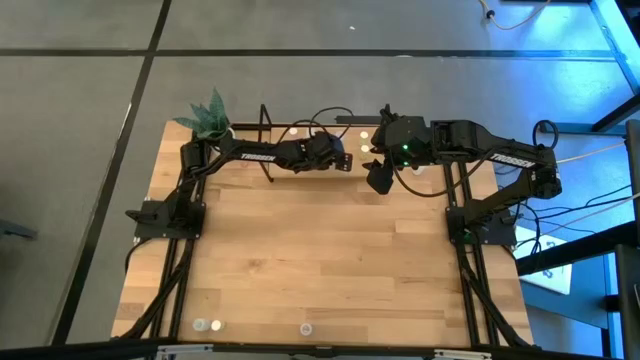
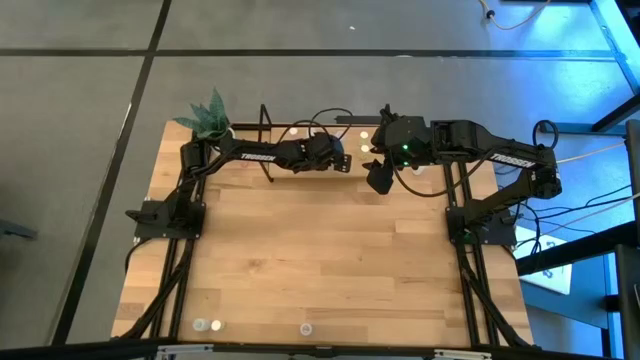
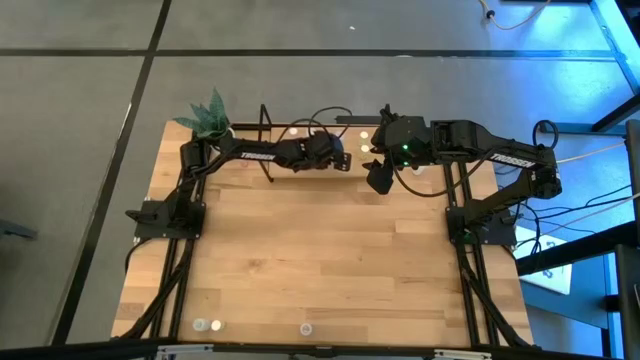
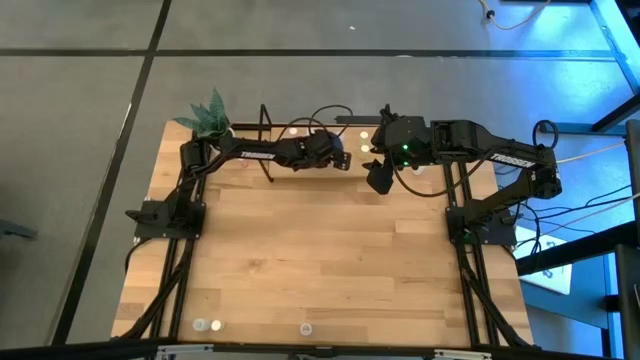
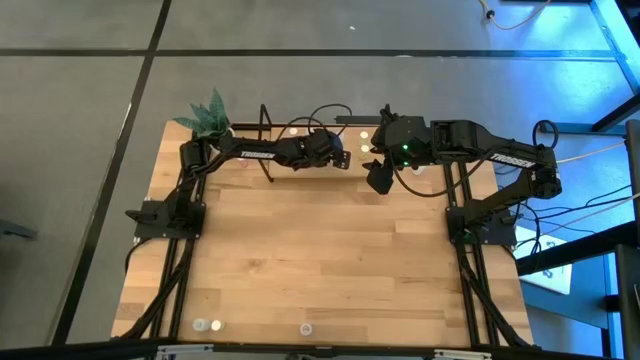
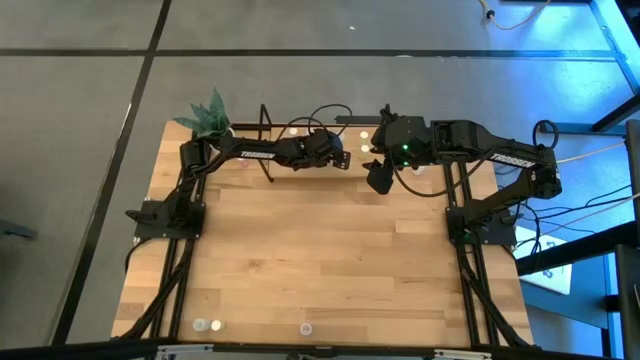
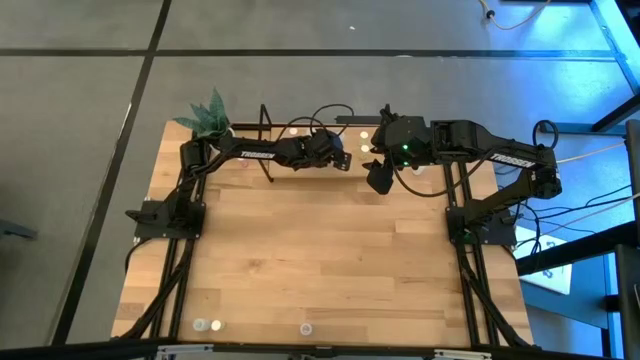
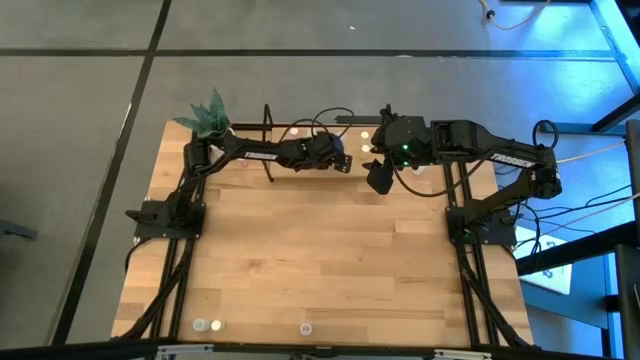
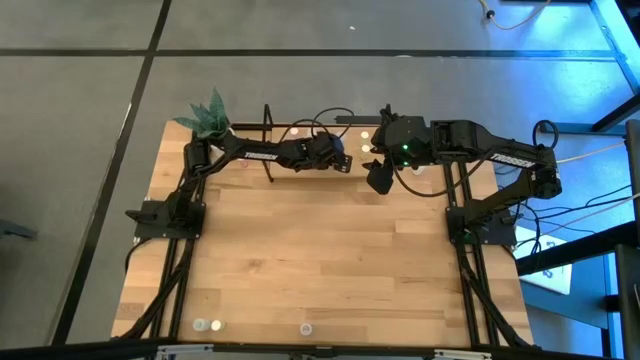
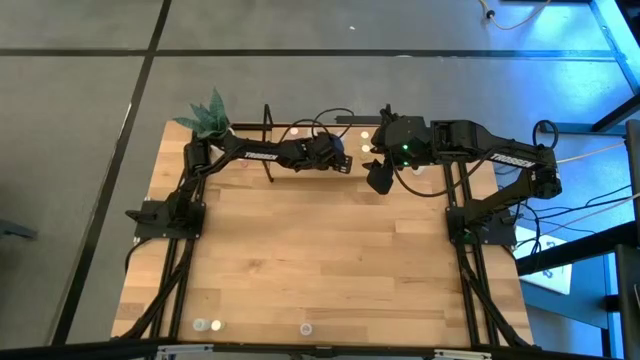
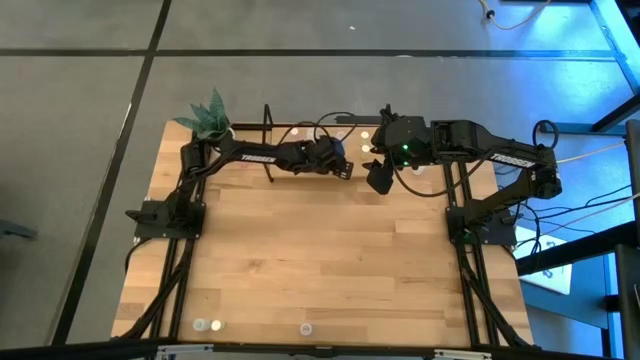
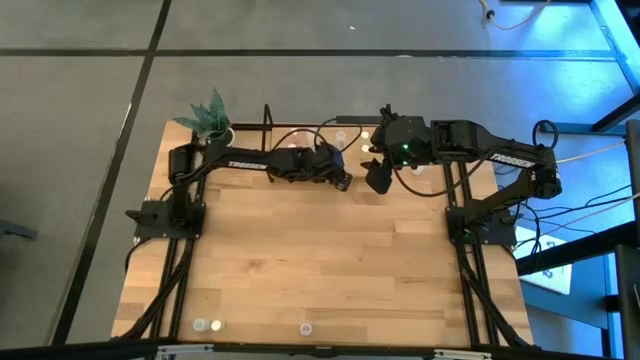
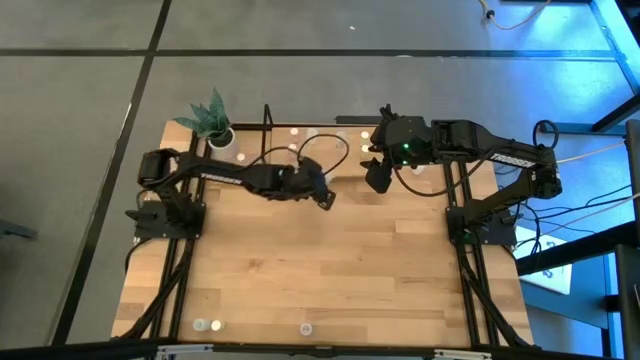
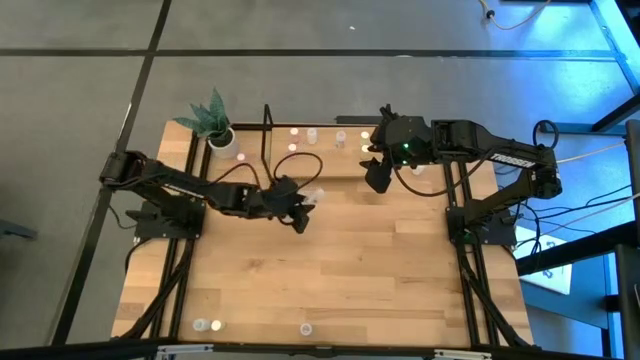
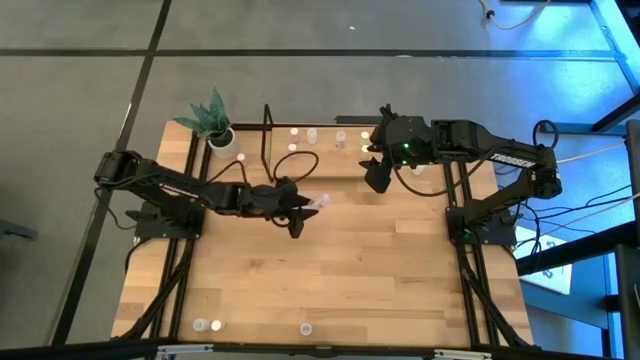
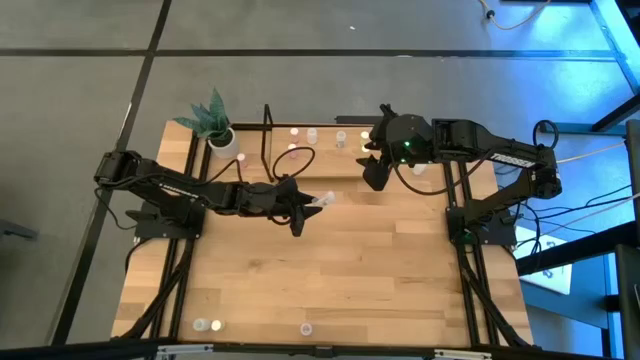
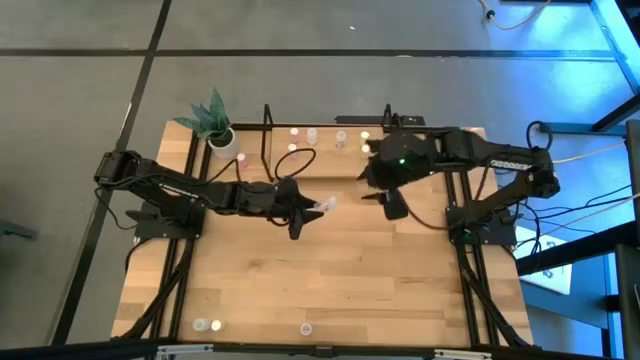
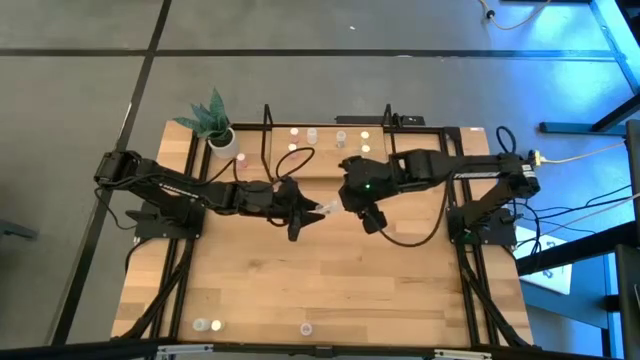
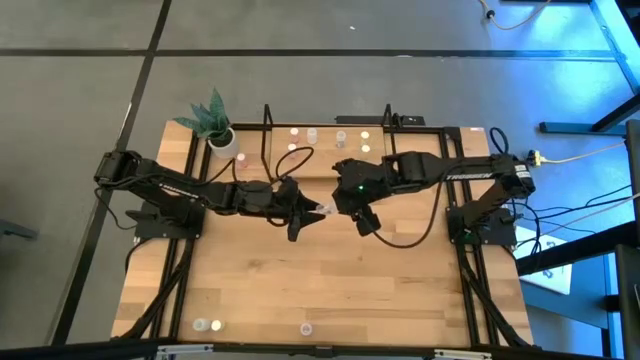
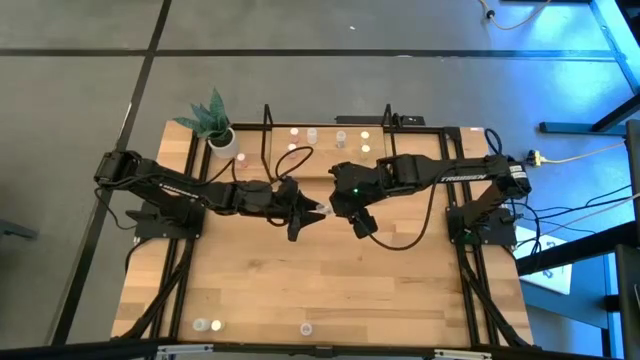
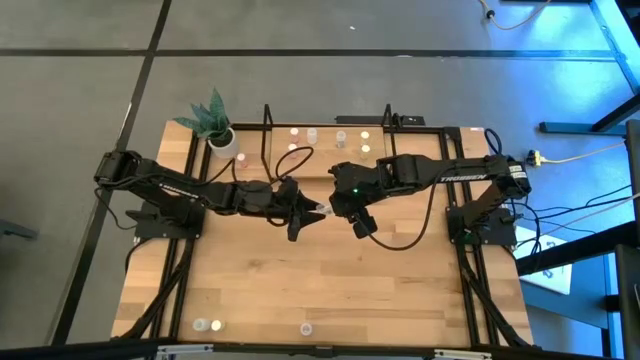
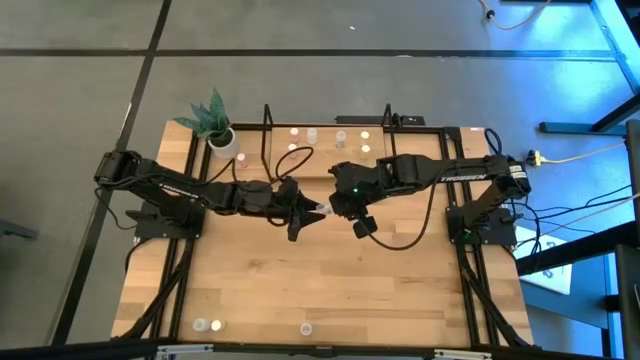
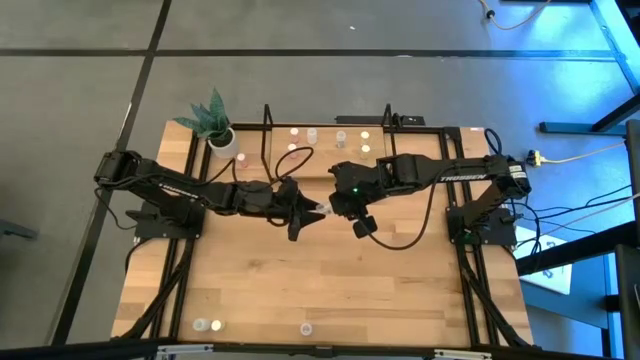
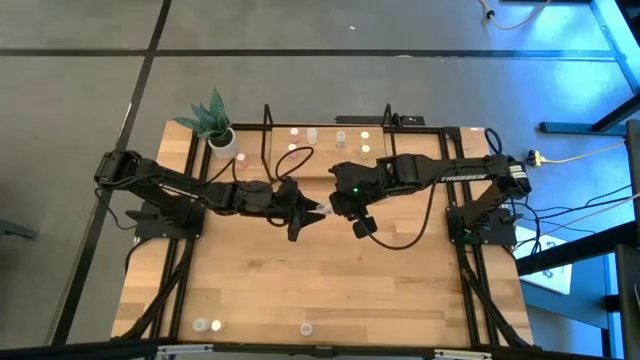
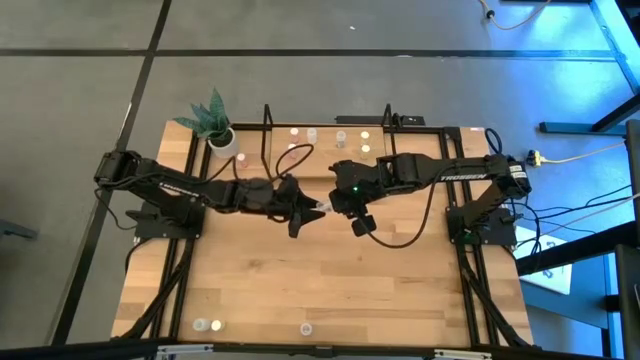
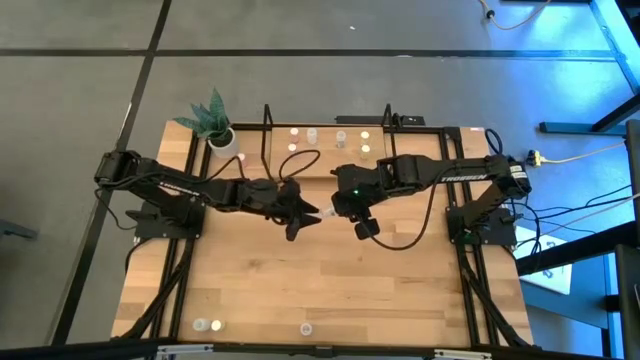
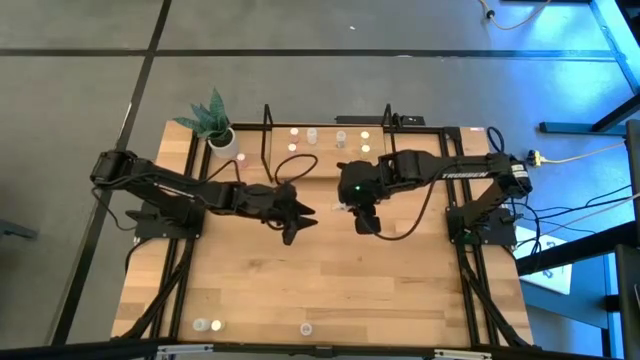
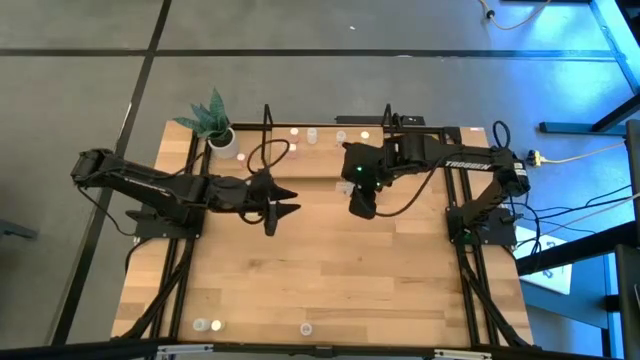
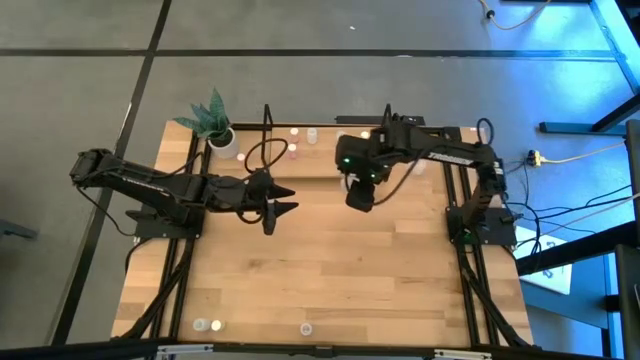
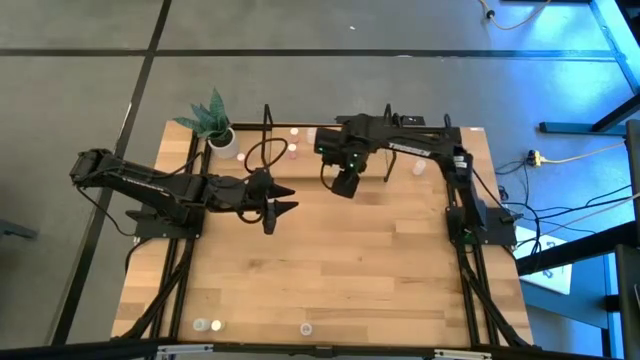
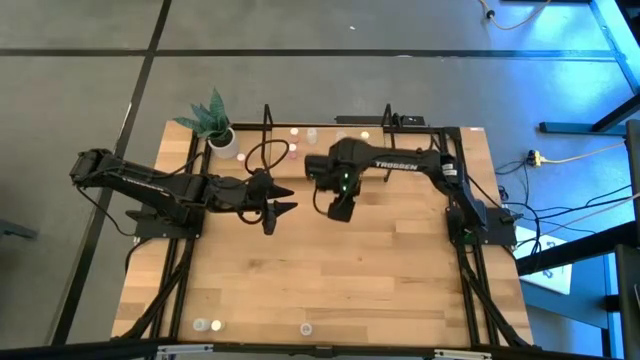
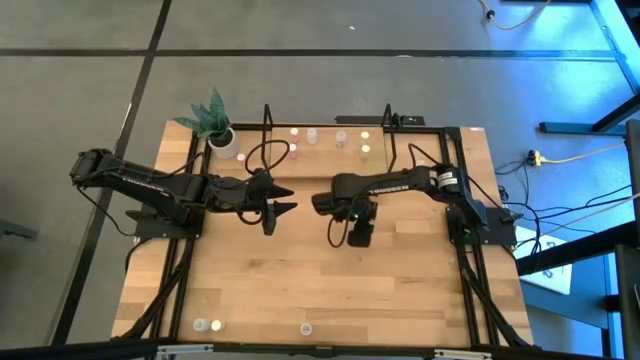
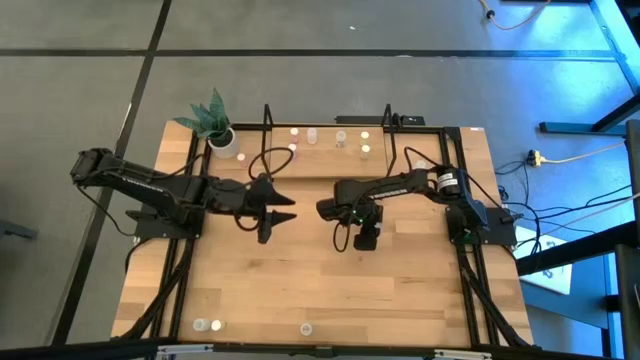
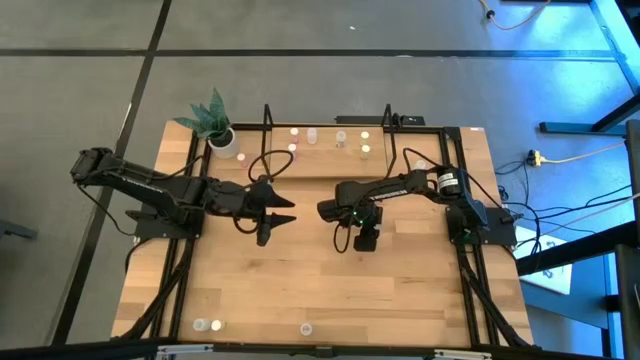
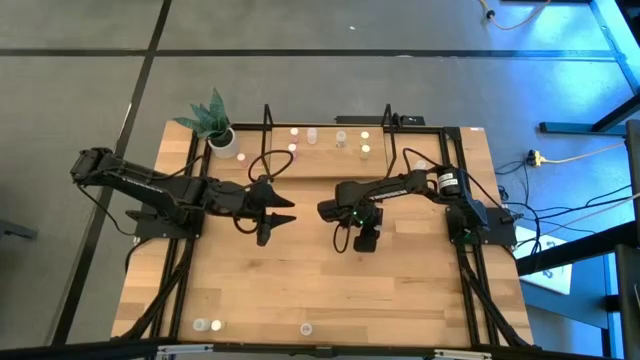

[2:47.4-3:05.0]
Task: Pick and place medicine bottles onto shelf by color
Put the top transparent pill bottle on the shelf aligned with the other transparent pill bottle

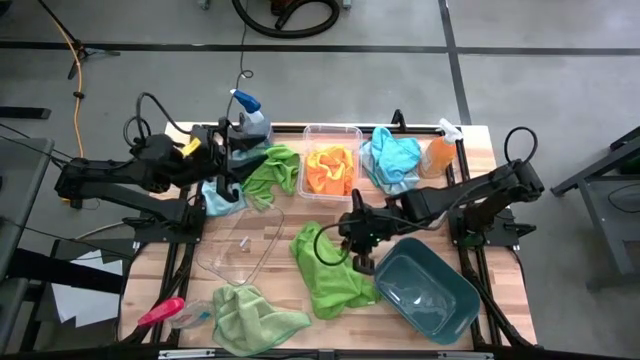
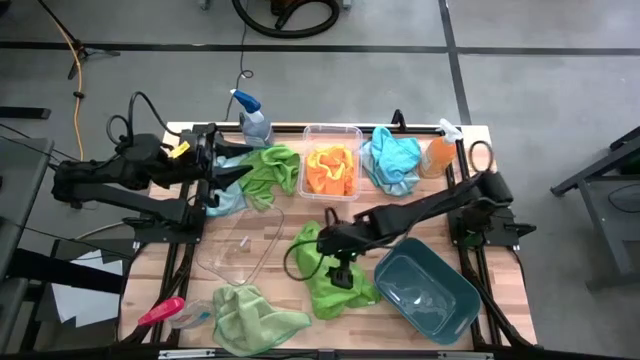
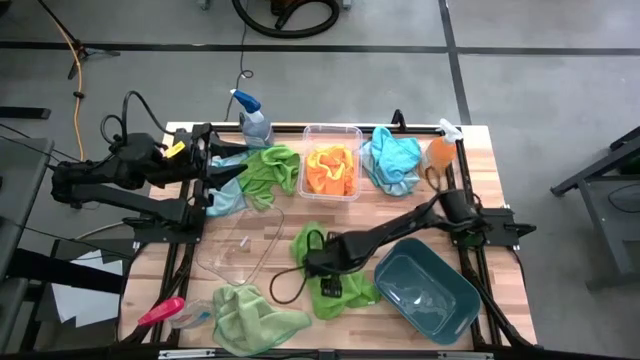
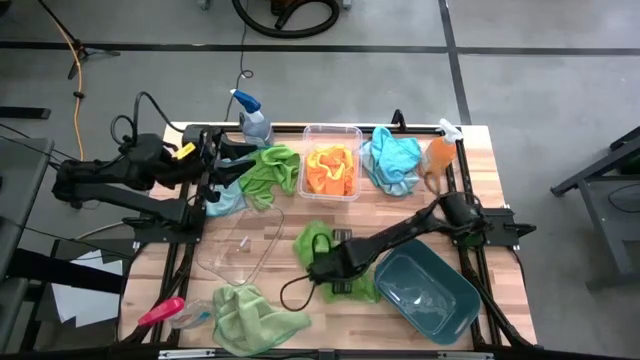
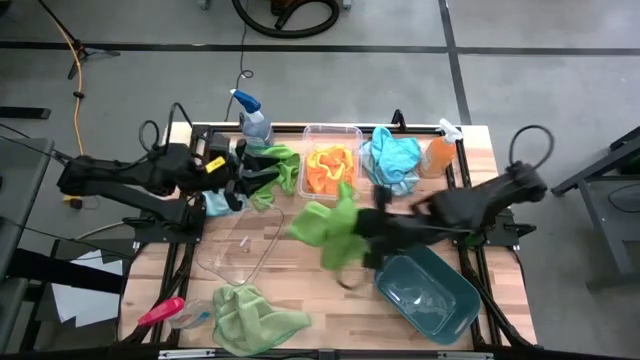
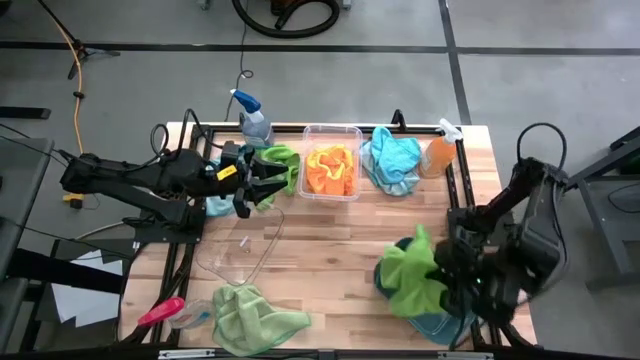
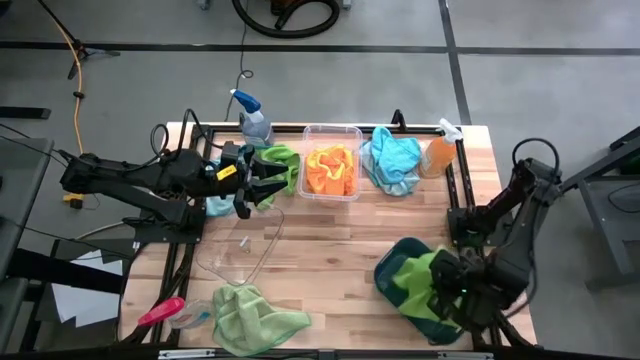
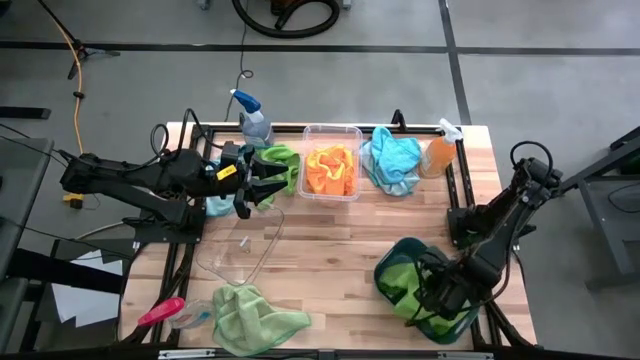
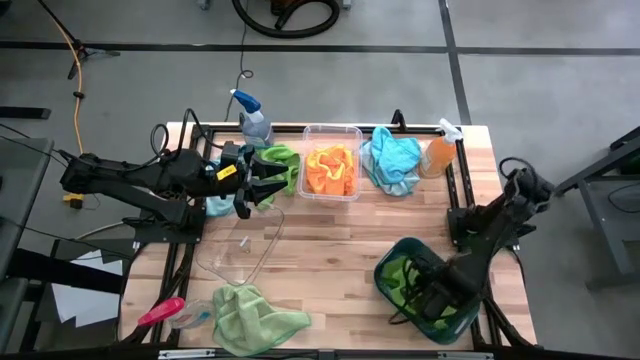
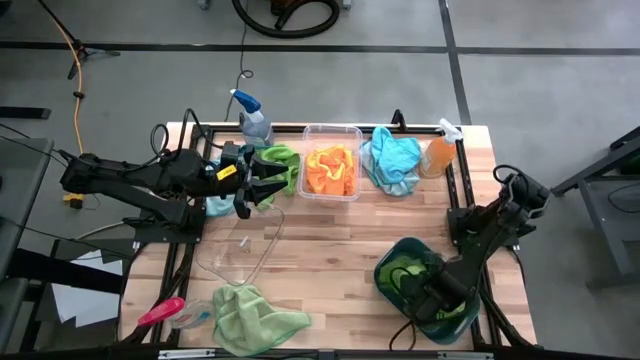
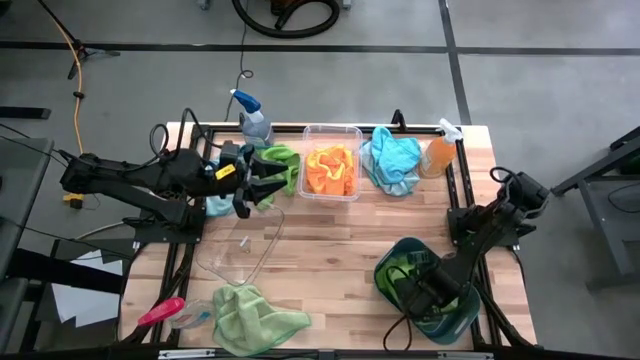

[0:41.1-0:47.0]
Task: Sort microfiber towel by color & place in baskets
Put the green microfiber towel into the blue bin
